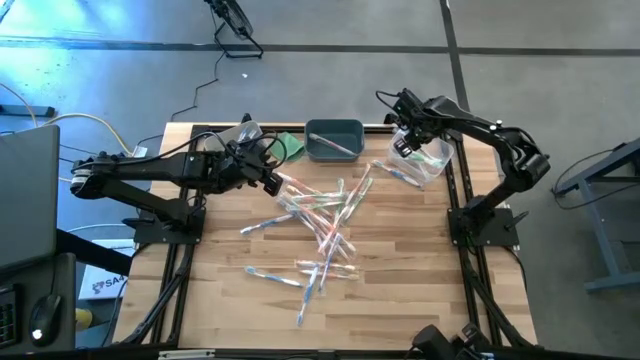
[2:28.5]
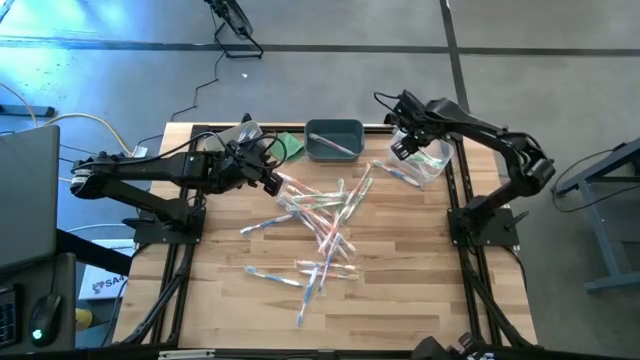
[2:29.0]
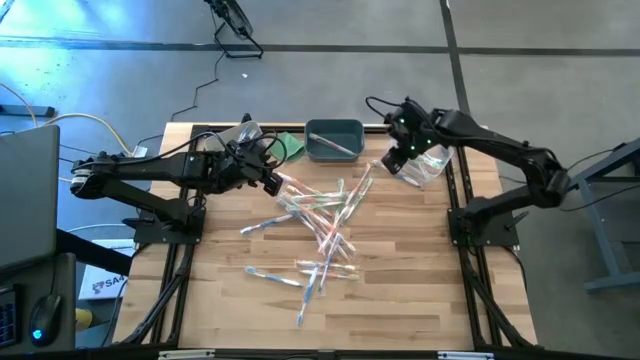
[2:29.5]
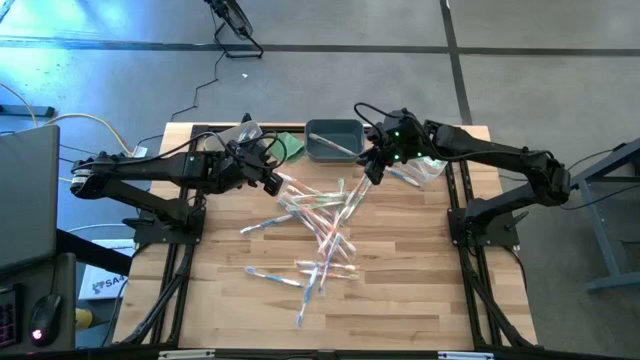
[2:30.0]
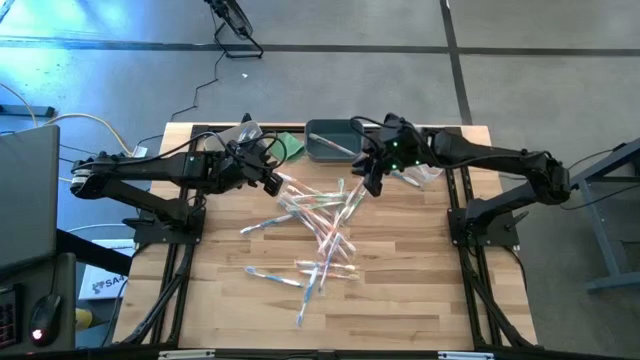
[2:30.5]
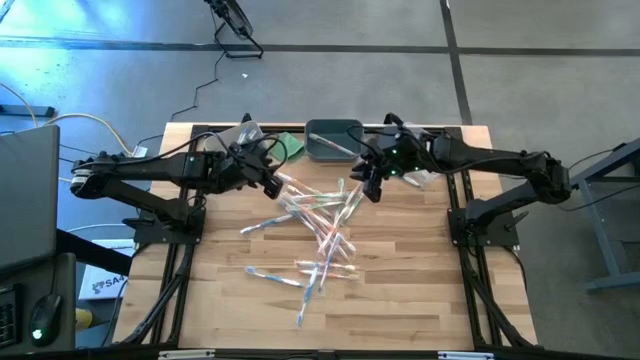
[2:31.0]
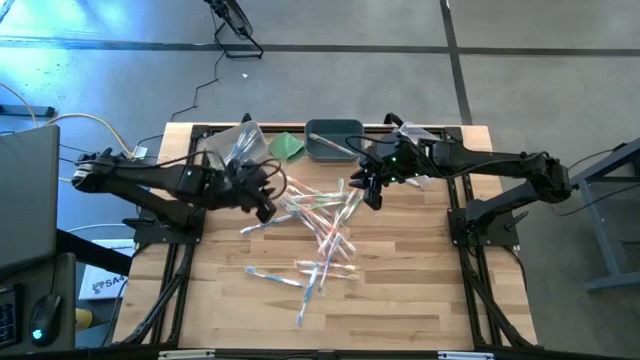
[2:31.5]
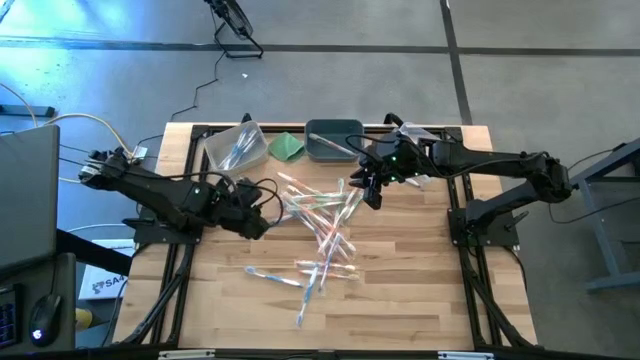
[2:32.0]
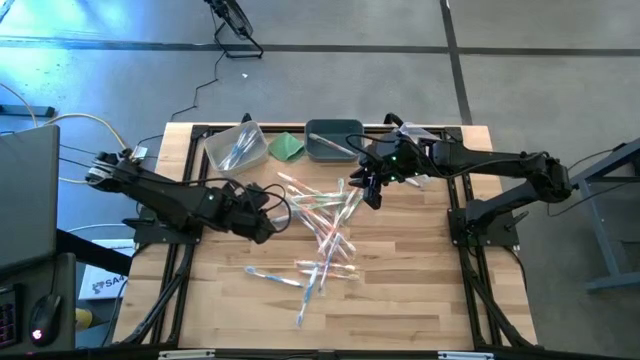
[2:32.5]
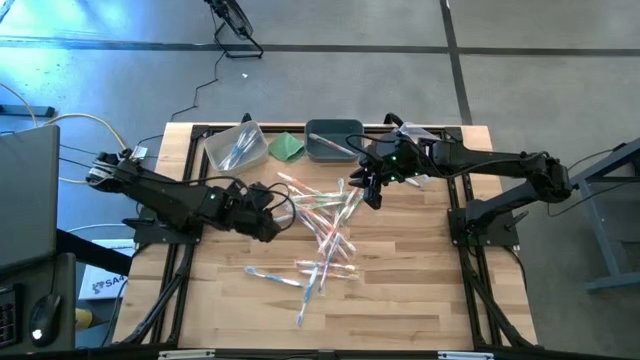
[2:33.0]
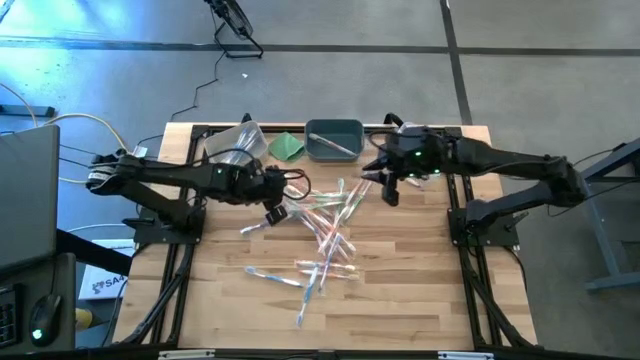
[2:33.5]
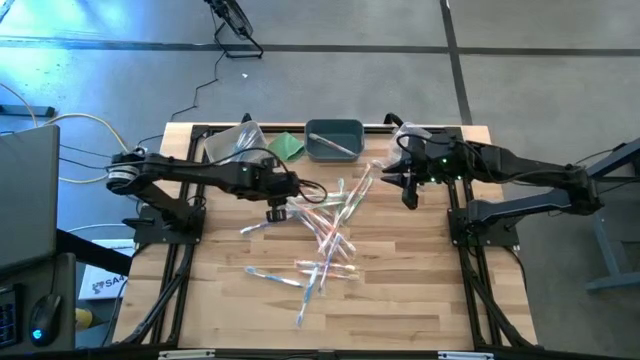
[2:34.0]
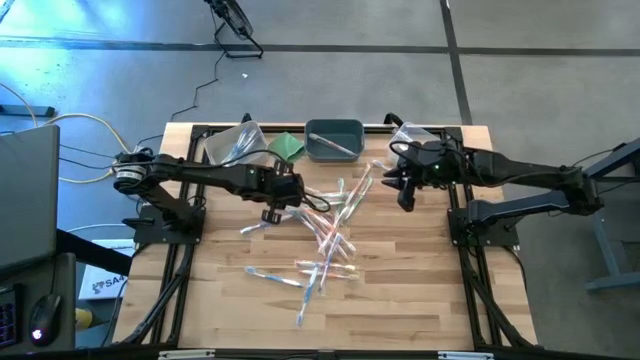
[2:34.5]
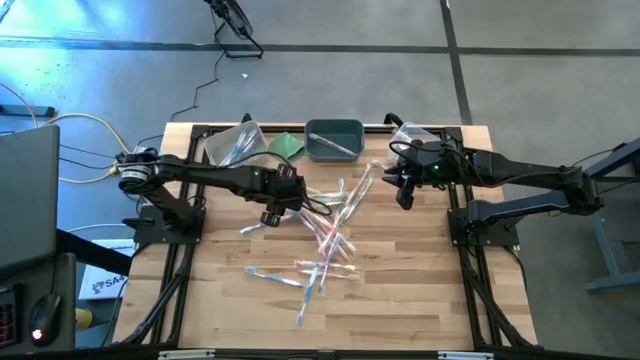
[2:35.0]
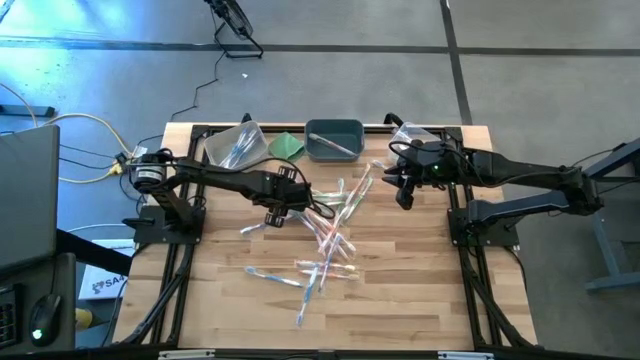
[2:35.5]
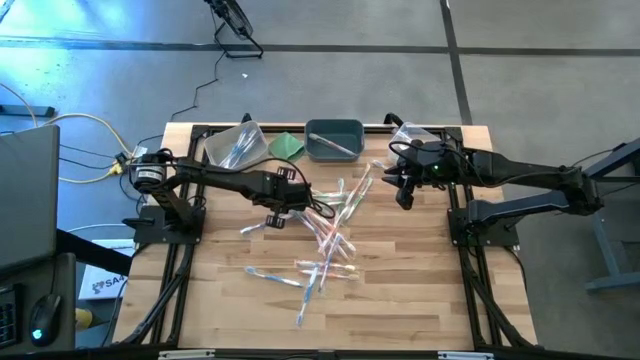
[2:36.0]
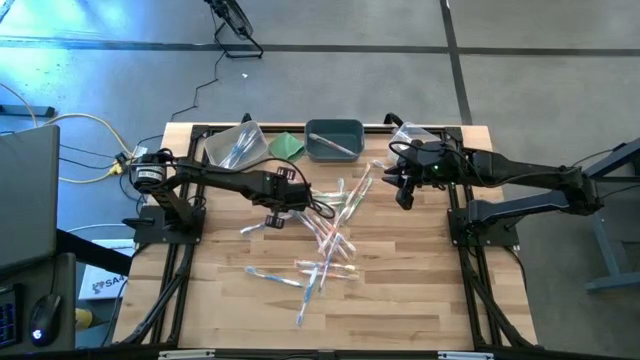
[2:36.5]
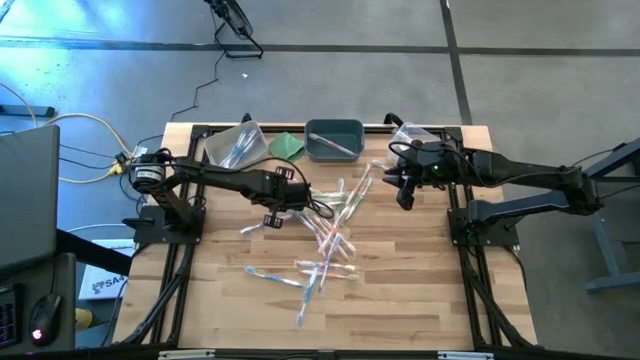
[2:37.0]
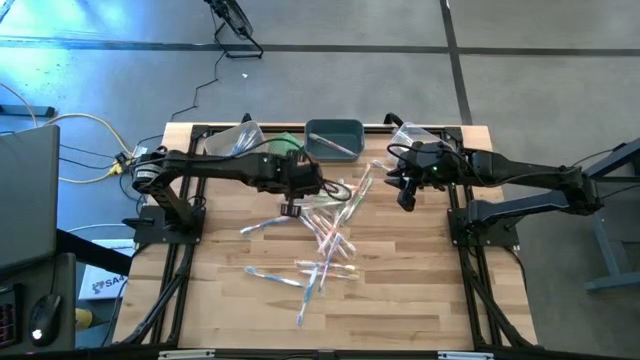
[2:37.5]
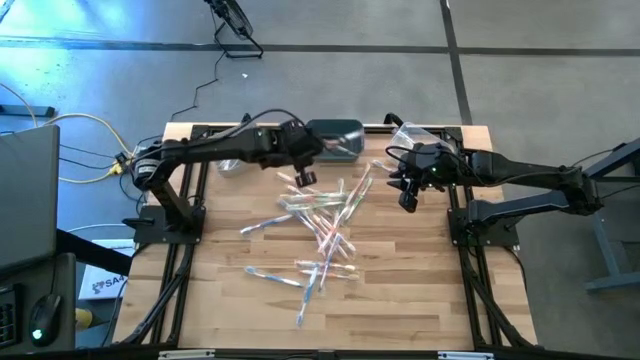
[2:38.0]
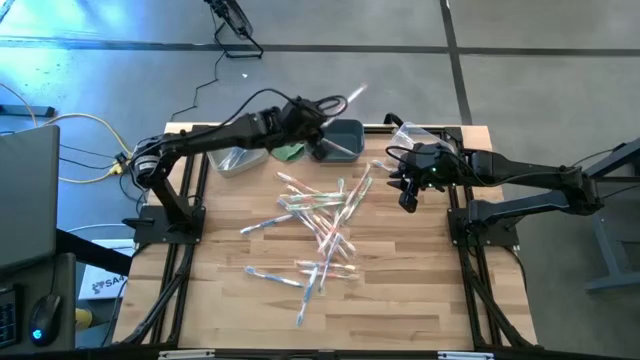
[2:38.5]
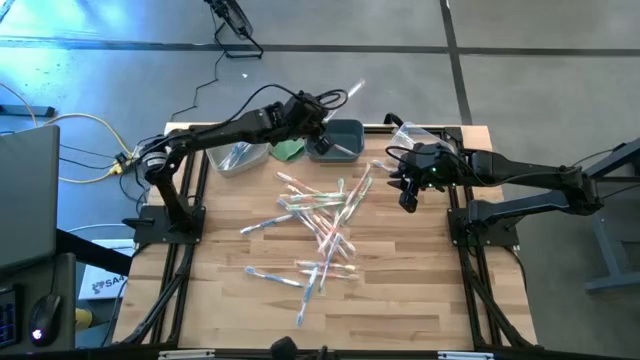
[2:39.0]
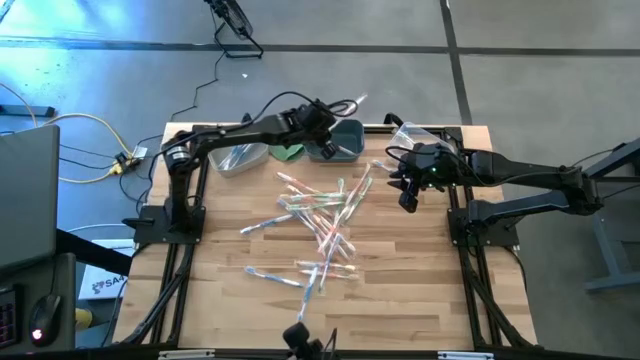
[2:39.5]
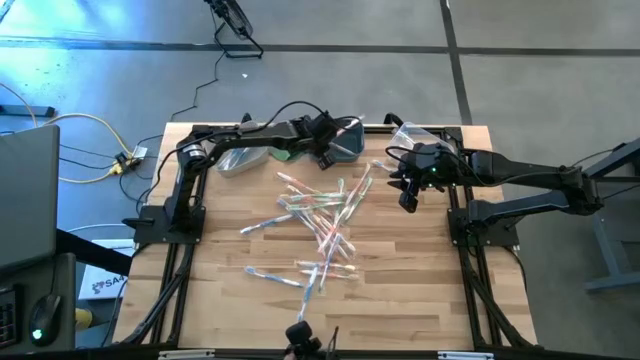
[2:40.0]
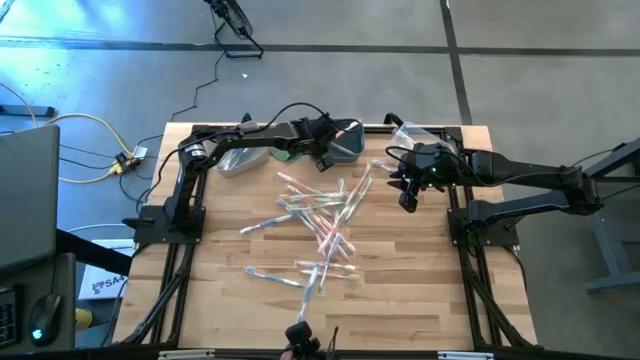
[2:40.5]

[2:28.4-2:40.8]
Task: Pick & Place Toothbrushes
Put the orange toothbrush into the blue bin

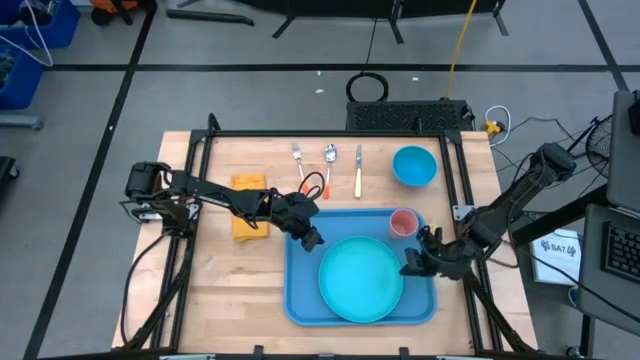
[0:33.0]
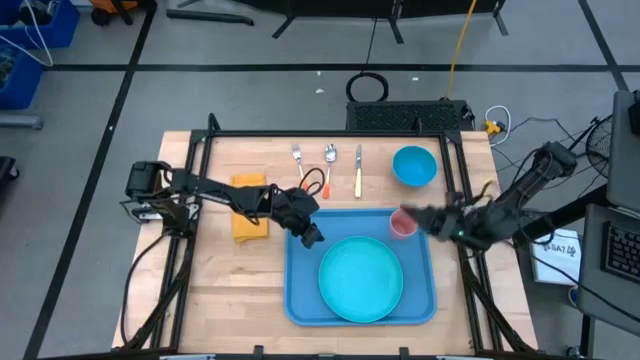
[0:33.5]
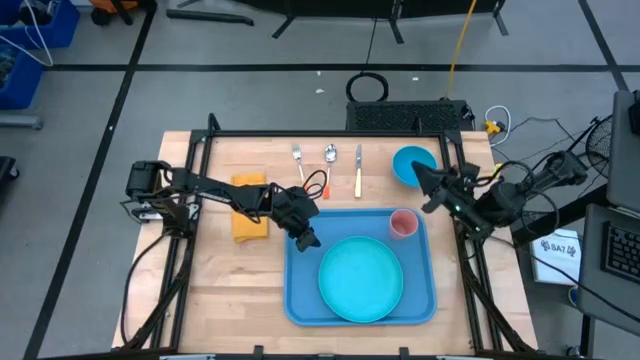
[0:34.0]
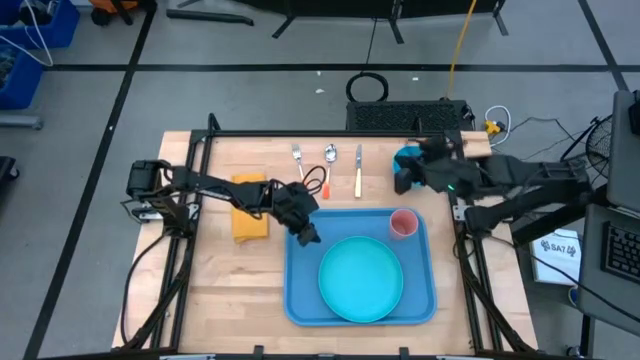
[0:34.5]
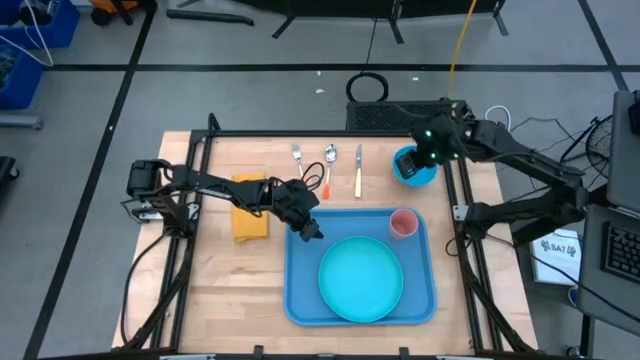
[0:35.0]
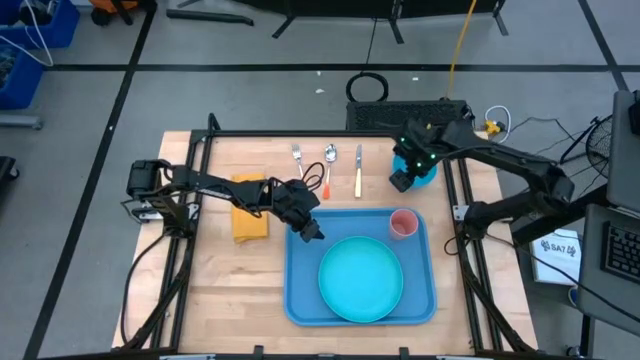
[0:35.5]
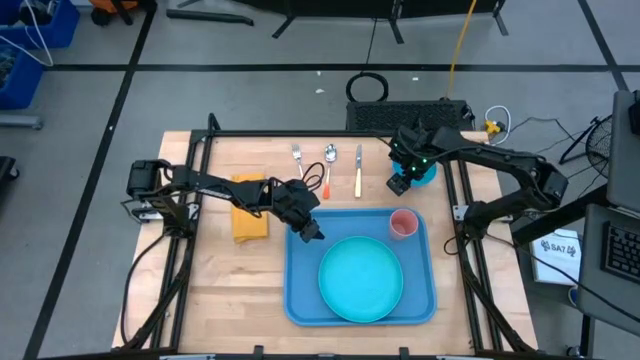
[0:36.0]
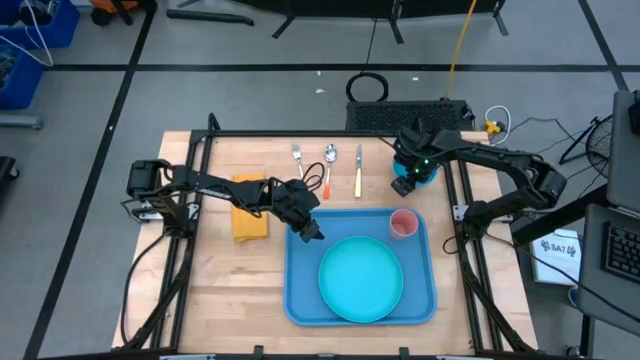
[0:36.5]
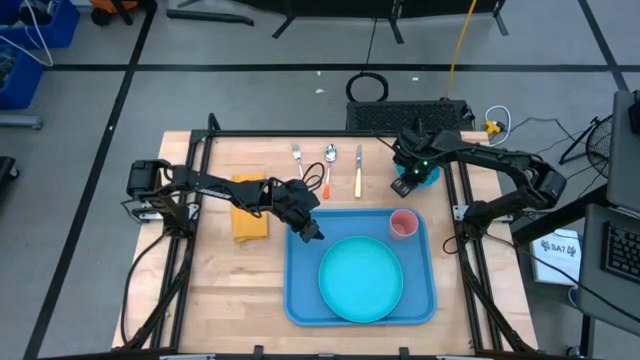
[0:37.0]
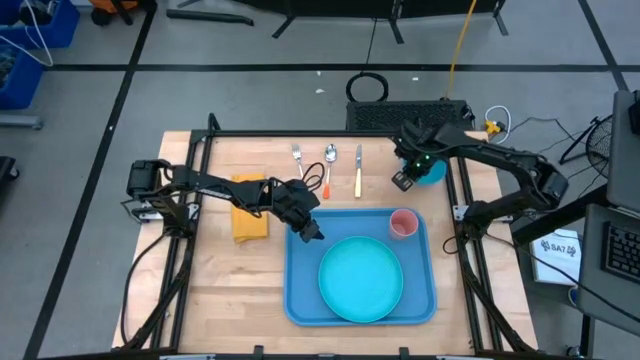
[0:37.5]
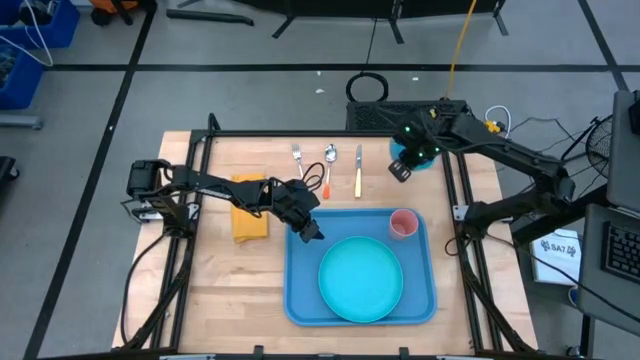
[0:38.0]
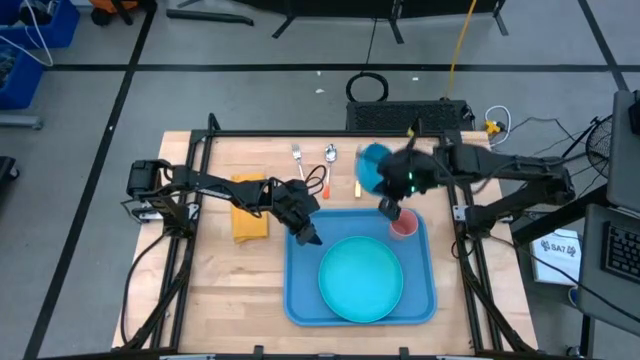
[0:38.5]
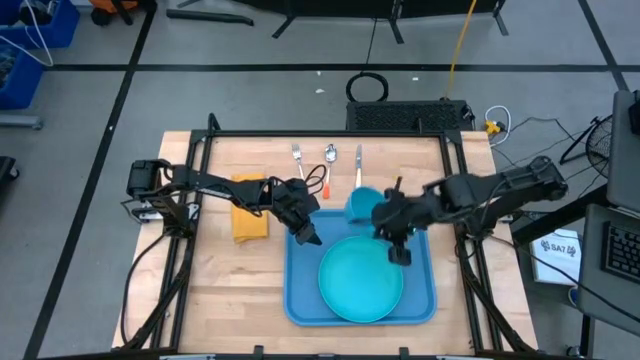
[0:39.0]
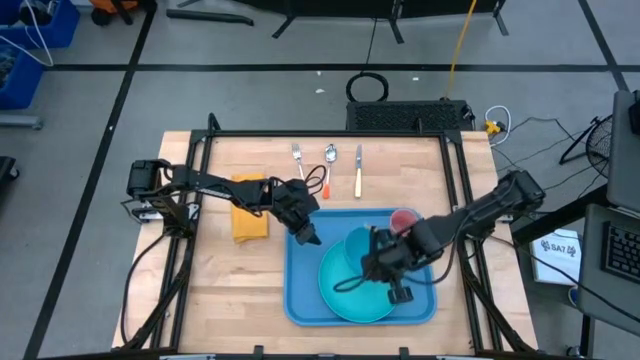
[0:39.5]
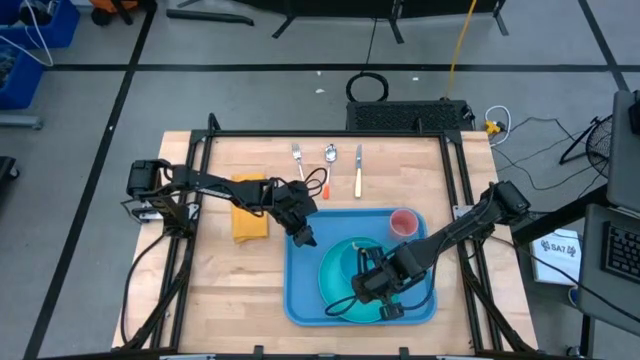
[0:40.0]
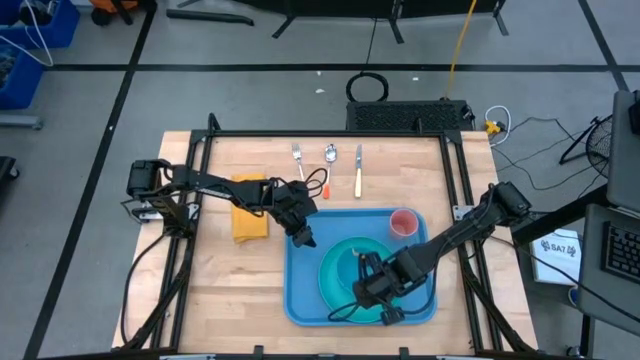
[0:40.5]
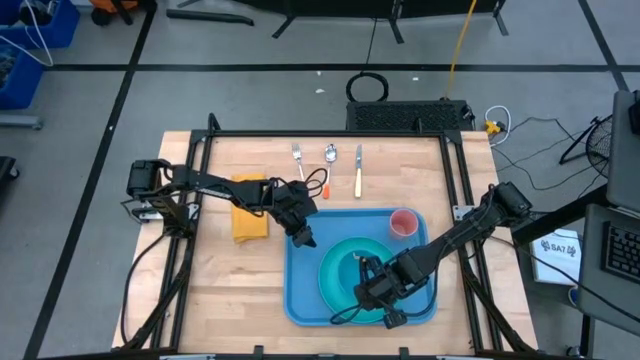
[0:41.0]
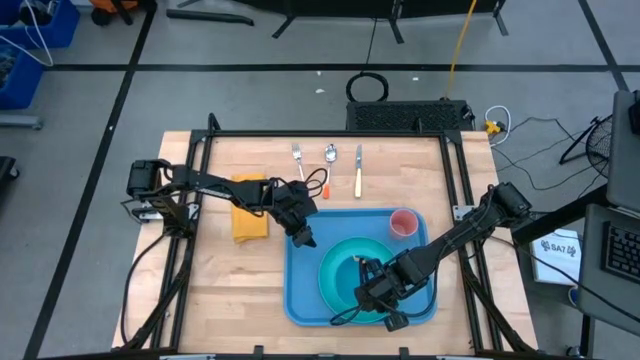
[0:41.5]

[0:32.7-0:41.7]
Task: Set up tray
Put the blue bowl on top of the the green plate
